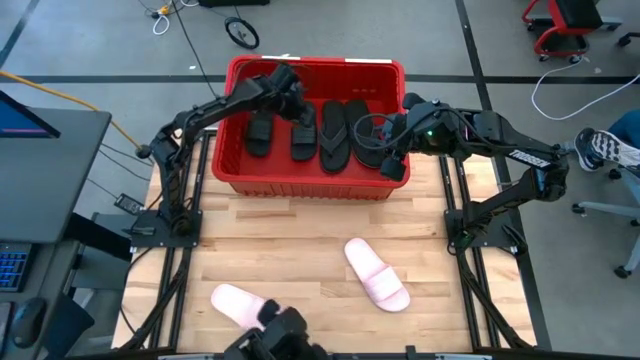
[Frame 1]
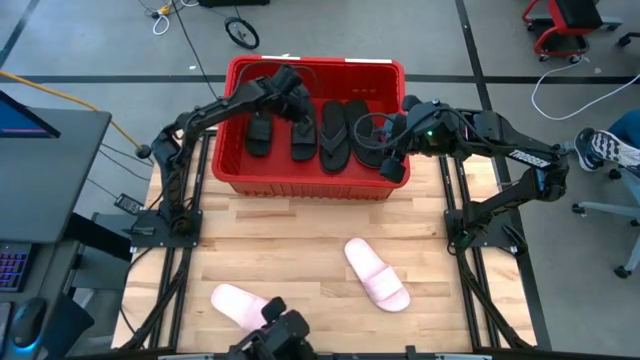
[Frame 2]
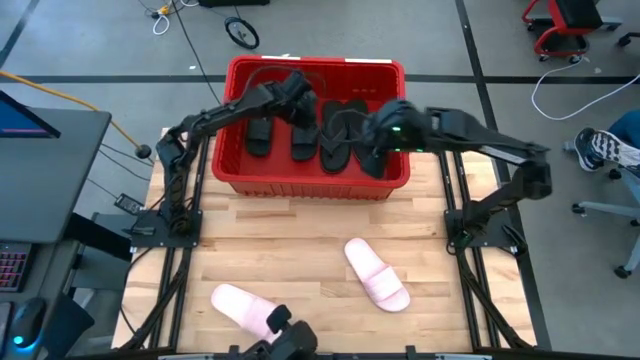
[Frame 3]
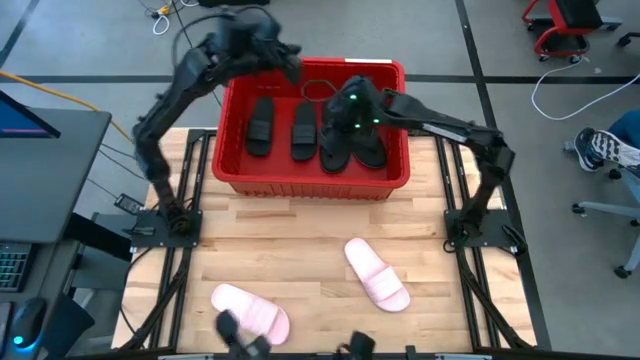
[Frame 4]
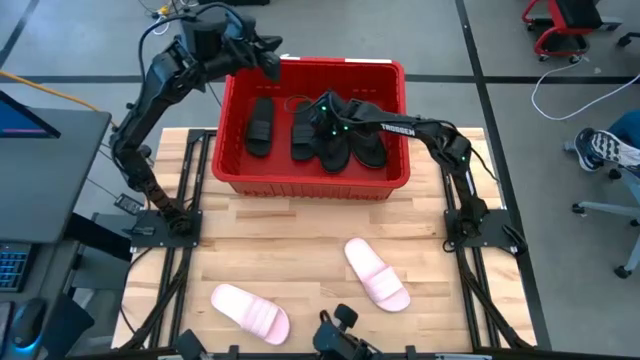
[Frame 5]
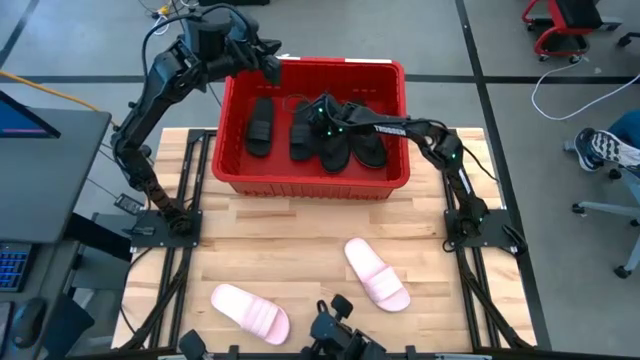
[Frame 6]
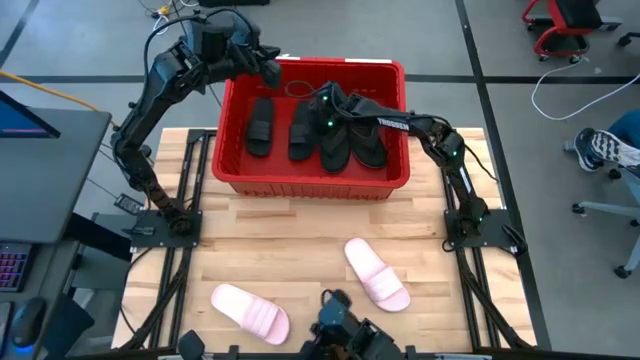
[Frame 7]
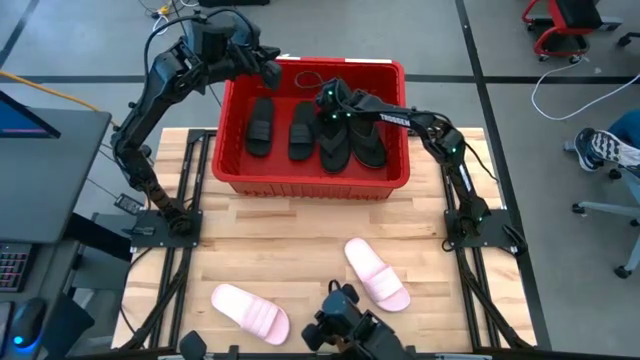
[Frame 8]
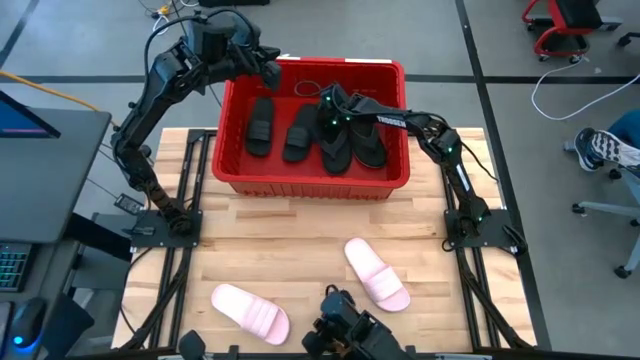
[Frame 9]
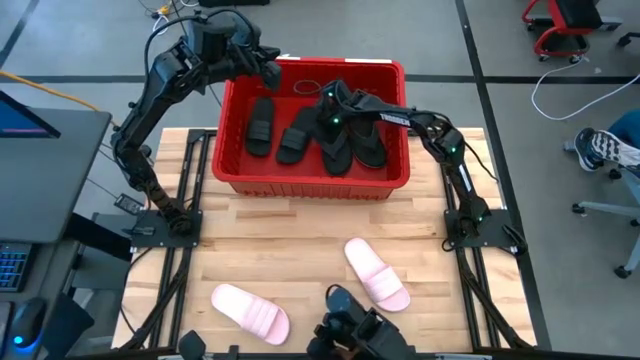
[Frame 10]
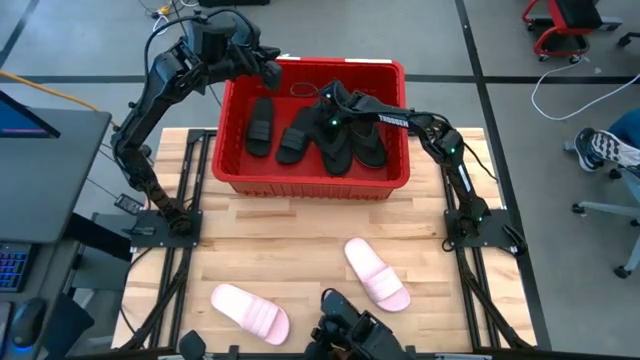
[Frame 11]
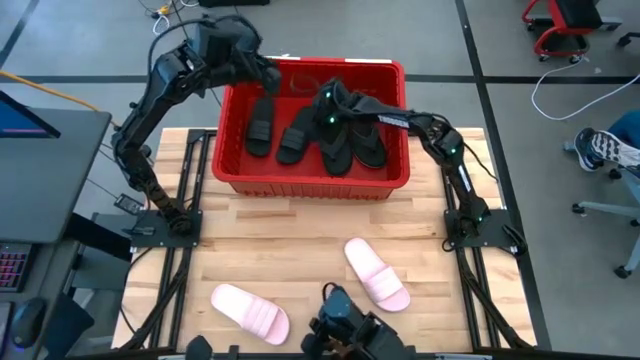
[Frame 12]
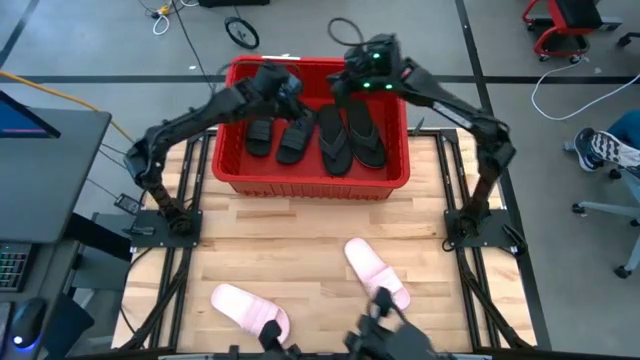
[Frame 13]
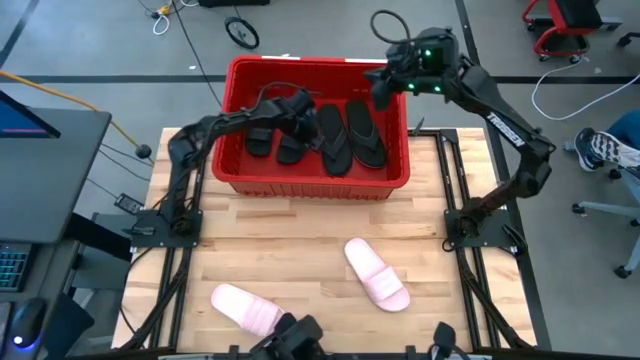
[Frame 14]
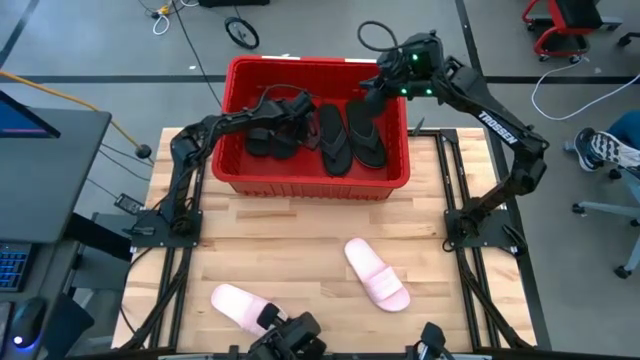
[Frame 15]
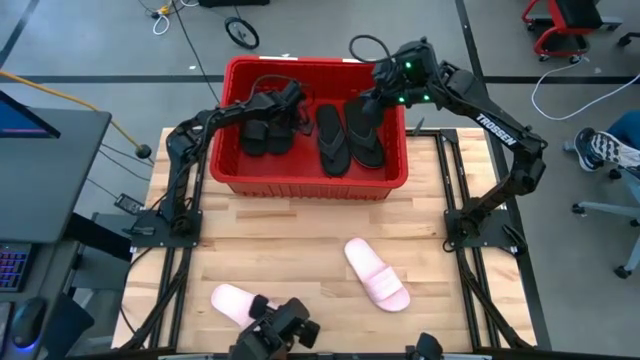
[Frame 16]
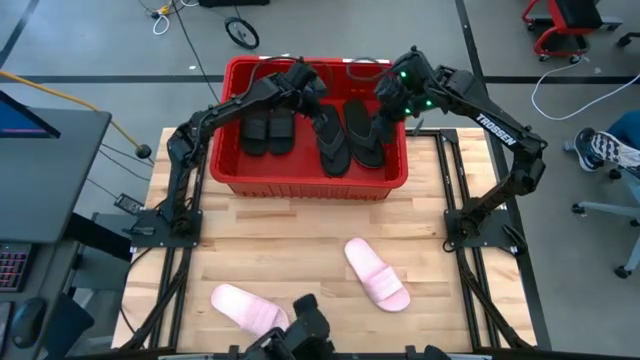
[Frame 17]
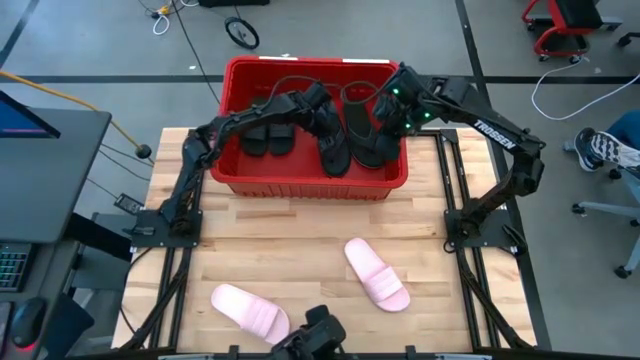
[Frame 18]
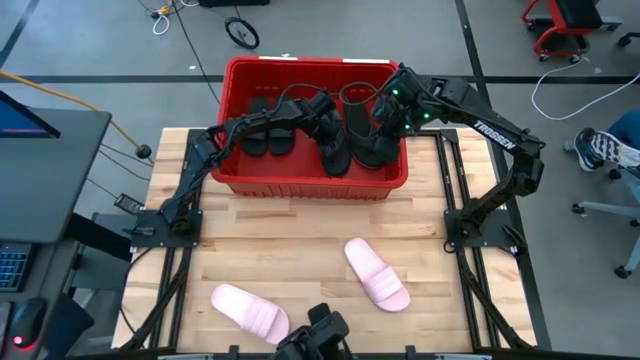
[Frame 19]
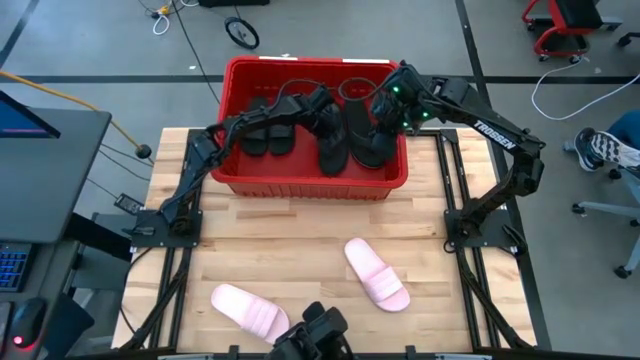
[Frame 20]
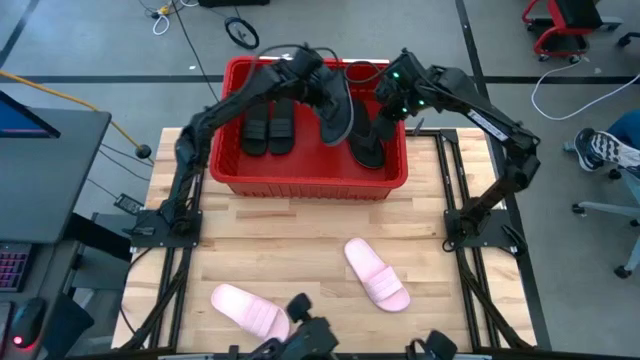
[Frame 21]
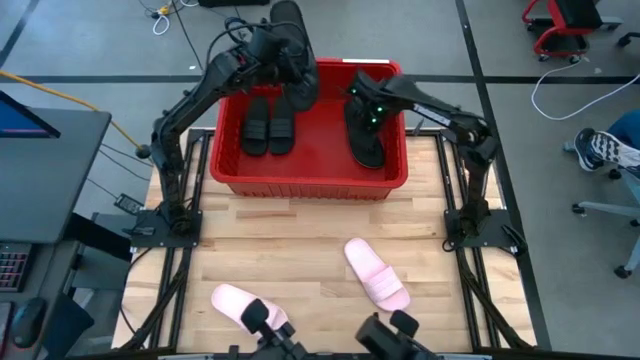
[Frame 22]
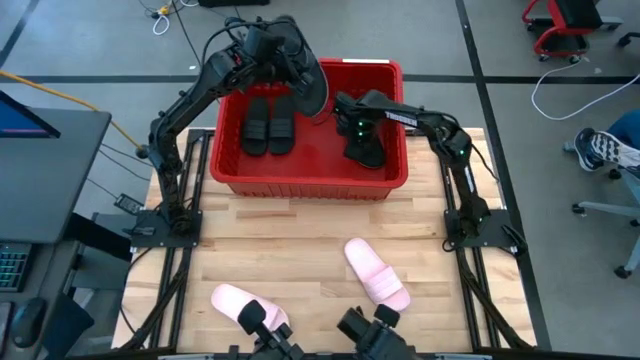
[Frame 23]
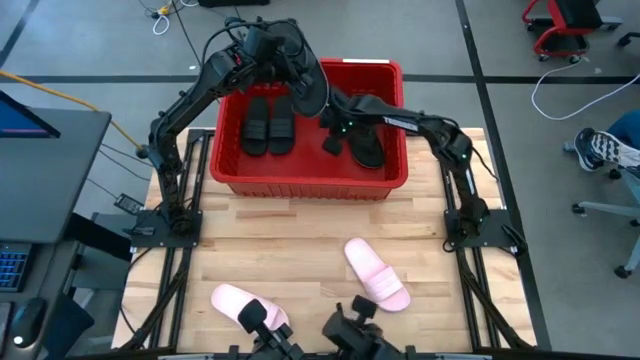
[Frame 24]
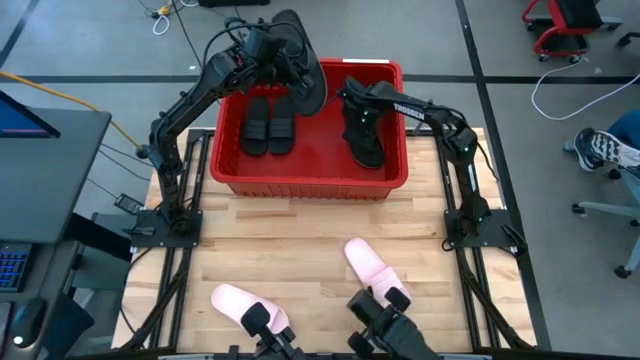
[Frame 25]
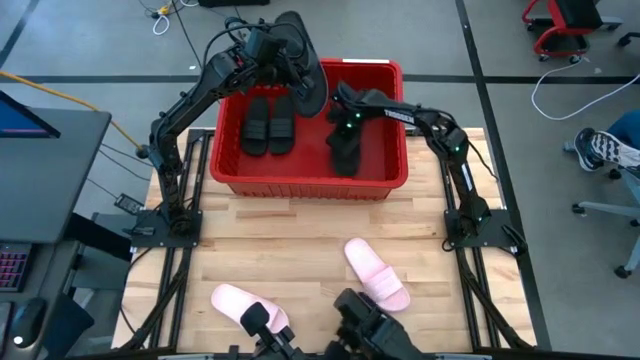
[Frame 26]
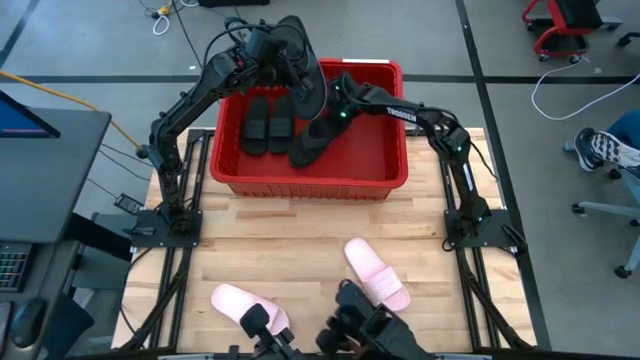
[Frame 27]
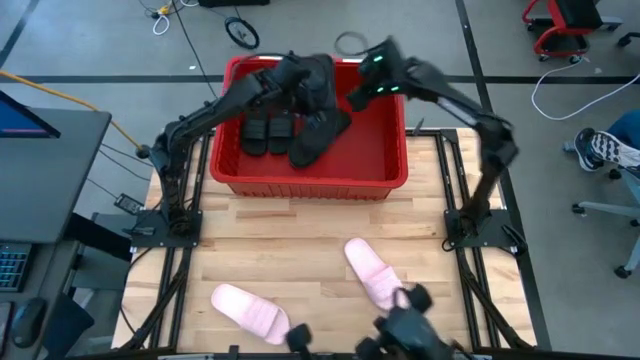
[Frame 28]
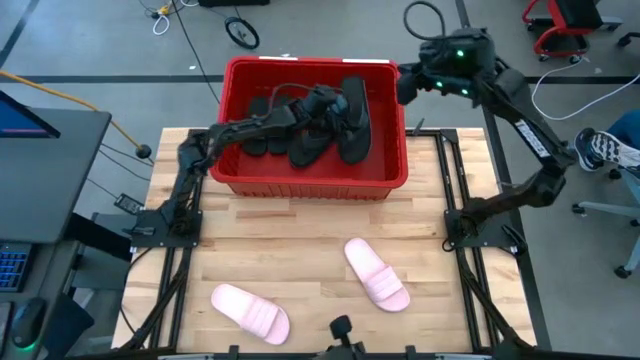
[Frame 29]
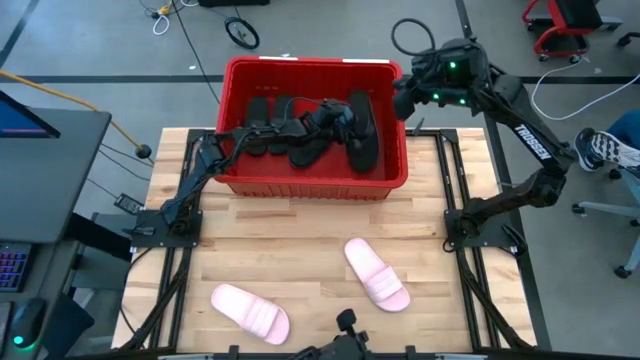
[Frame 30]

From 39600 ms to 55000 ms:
Task: Pick and place slides into bin
Adjust the slippers and slides in the red container

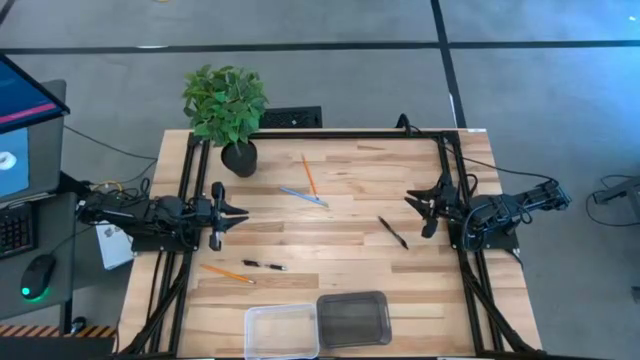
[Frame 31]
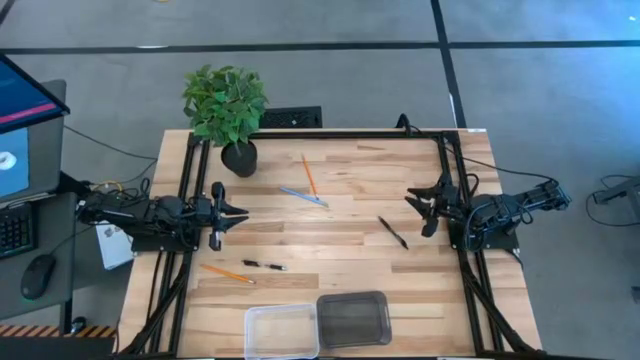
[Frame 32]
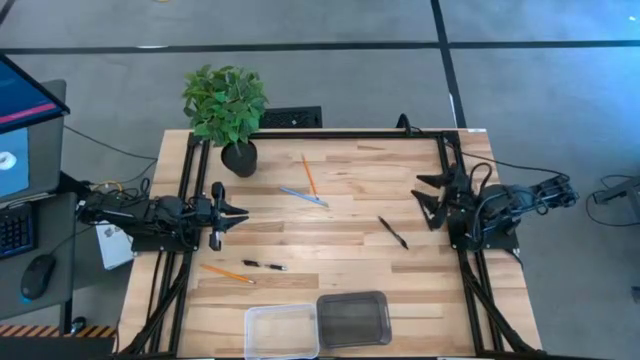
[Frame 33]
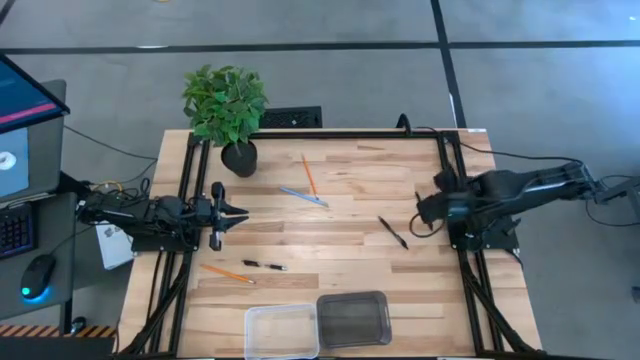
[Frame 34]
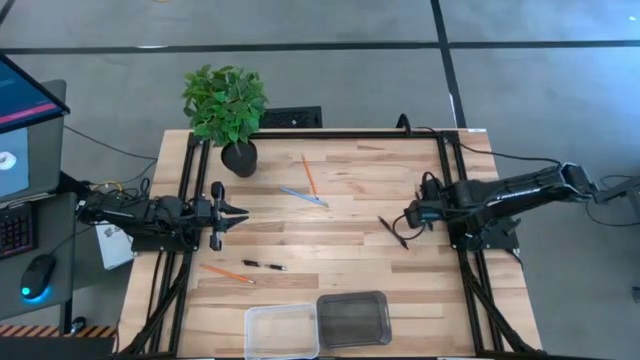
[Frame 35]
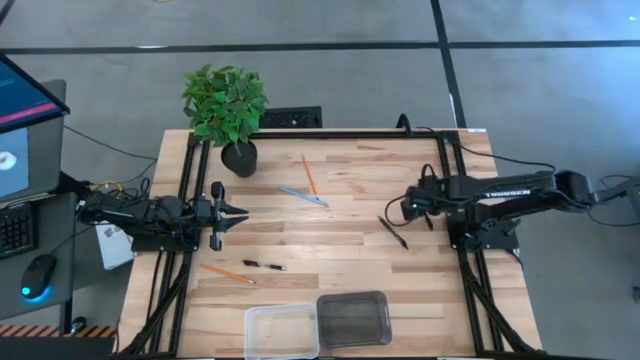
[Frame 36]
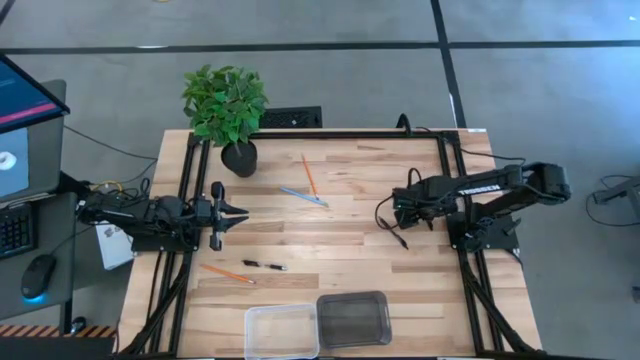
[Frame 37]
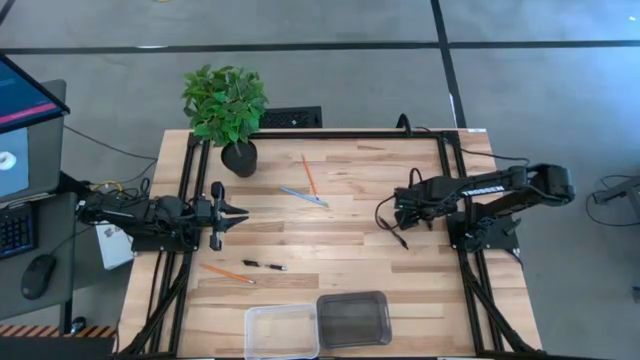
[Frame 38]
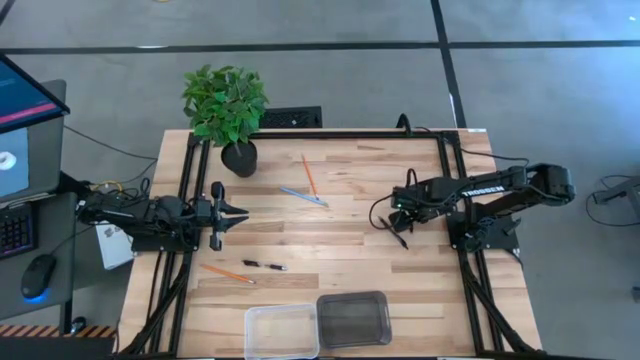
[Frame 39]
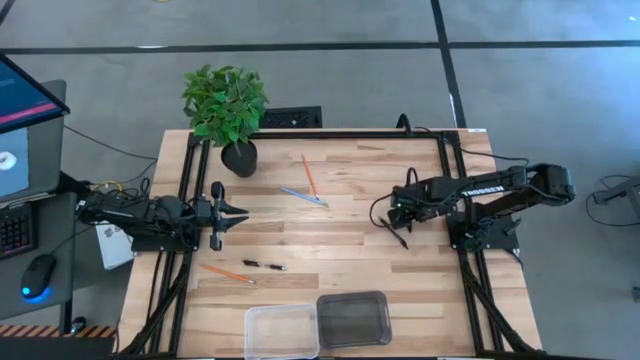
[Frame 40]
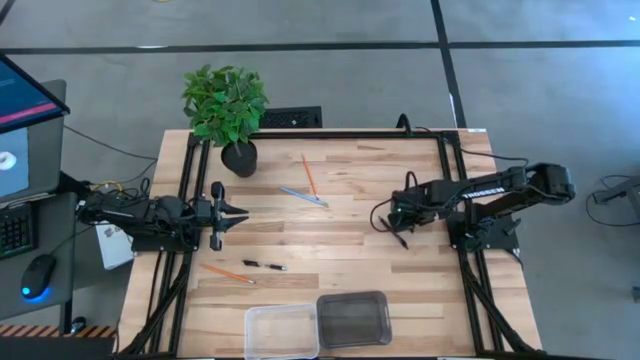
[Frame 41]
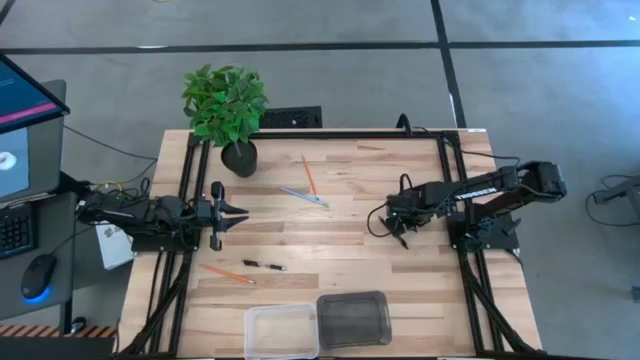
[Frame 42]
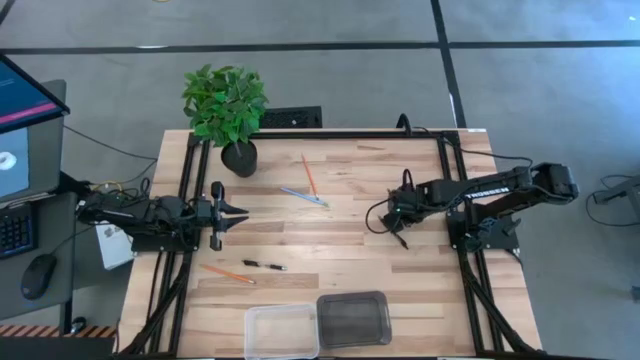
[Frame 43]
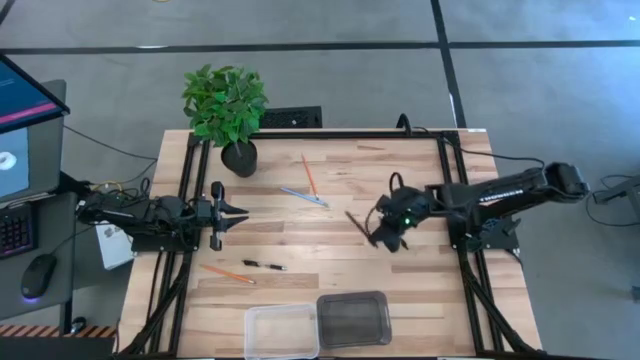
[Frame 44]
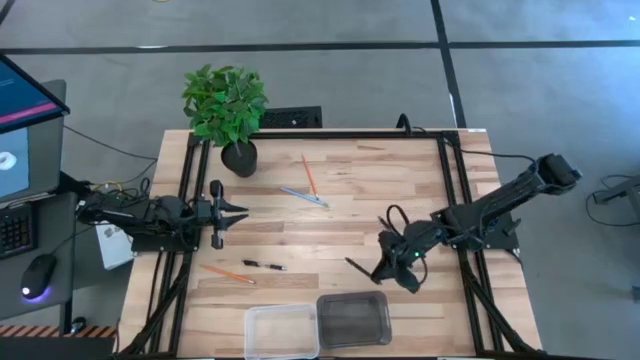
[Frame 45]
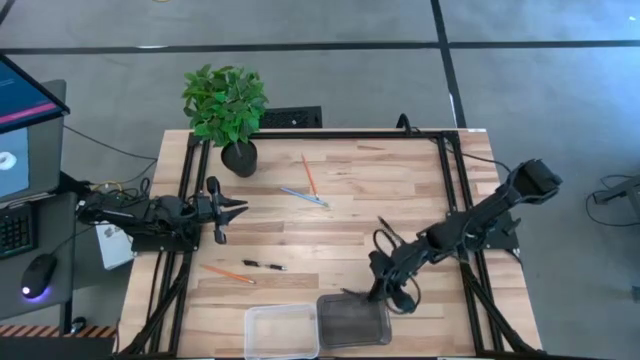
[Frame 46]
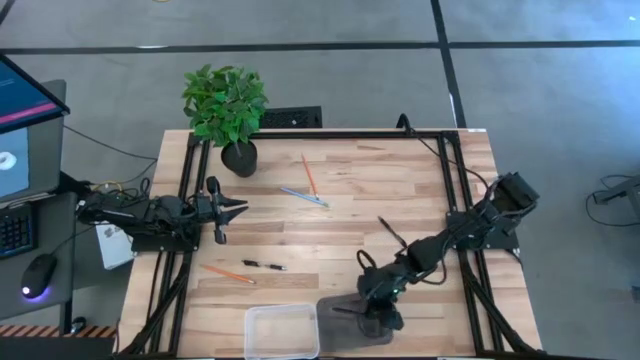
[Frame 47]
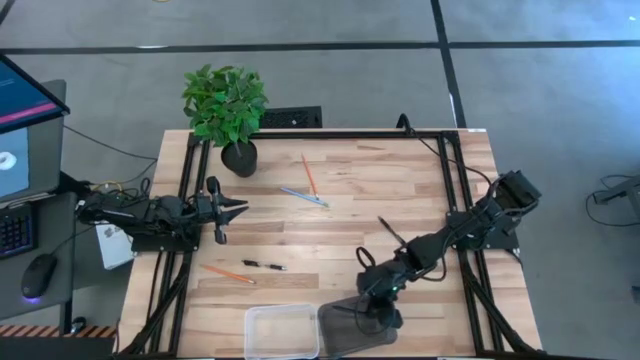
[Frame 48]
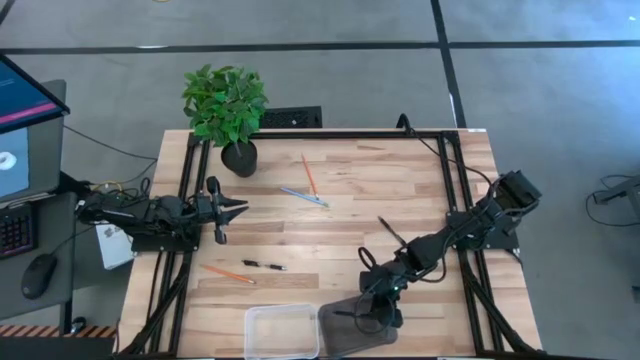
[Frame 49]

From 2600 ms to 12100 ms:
Task: Sort pens & pencils
Put the right black pen into the black bin
